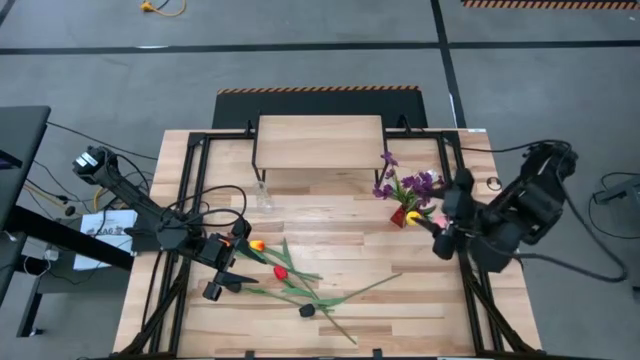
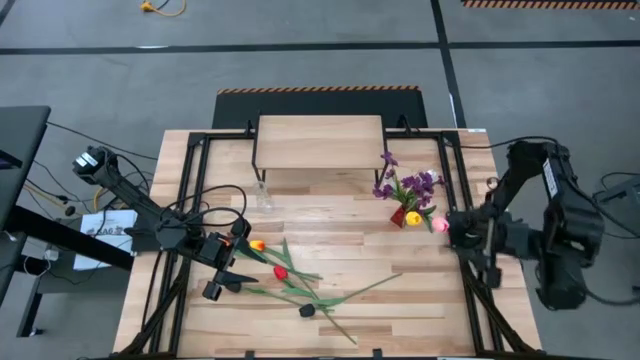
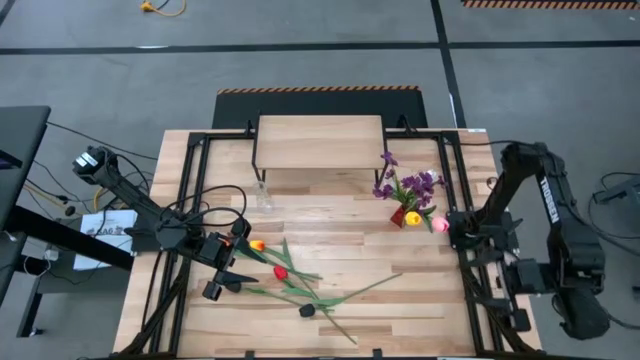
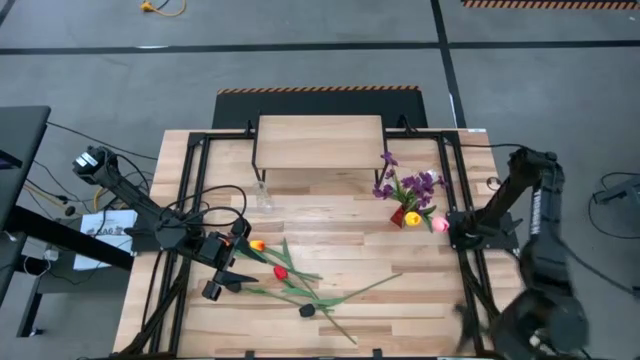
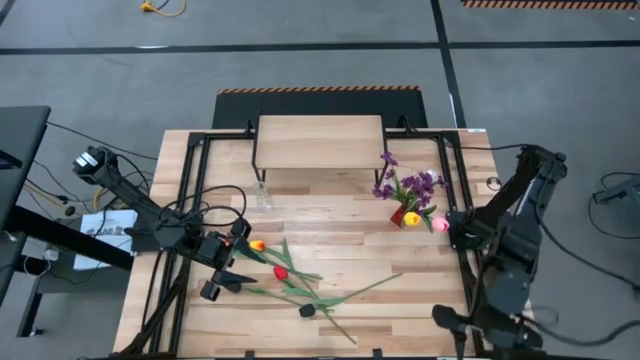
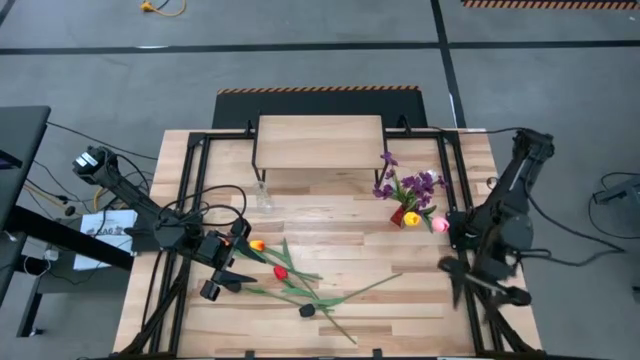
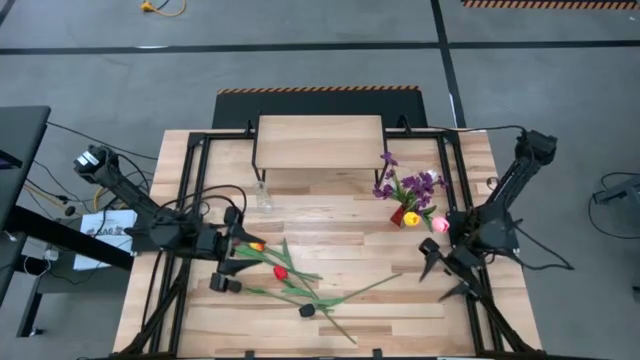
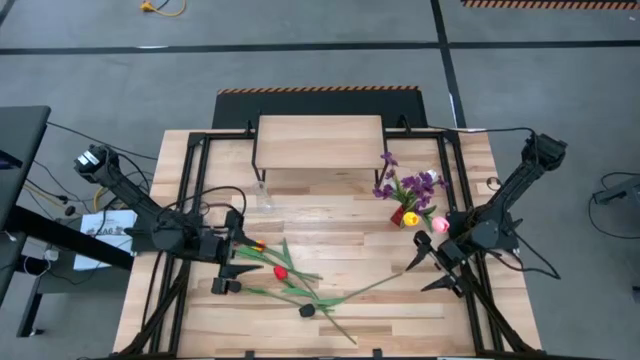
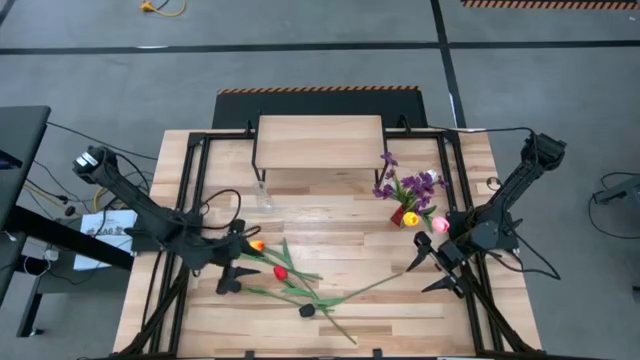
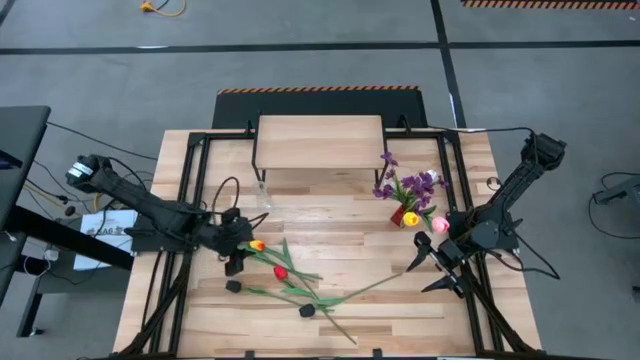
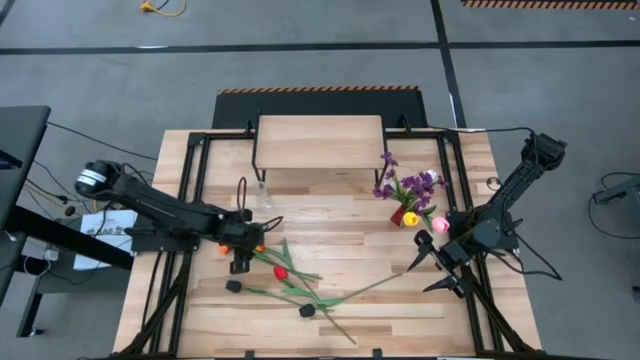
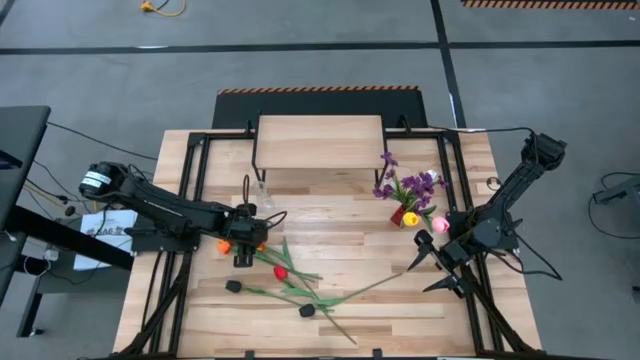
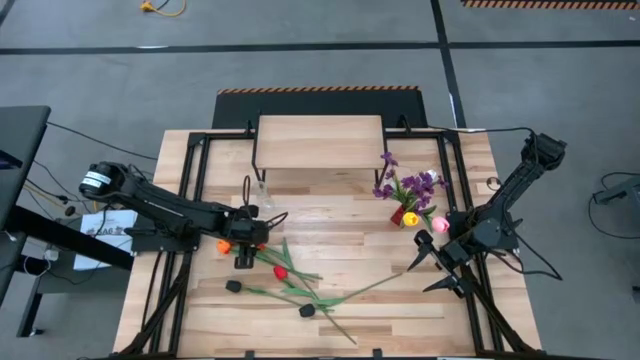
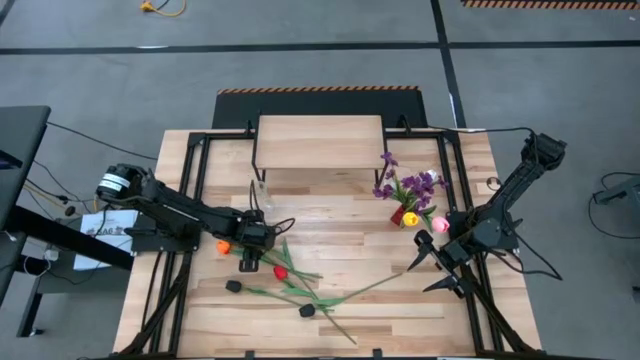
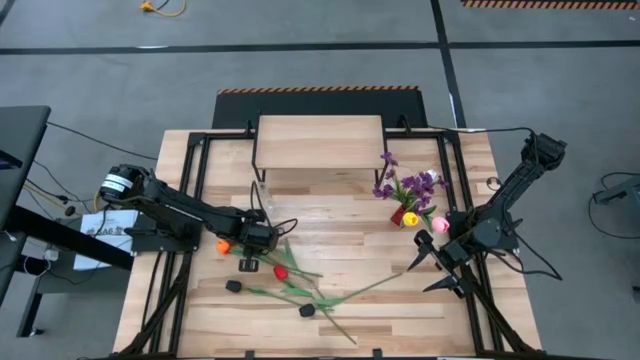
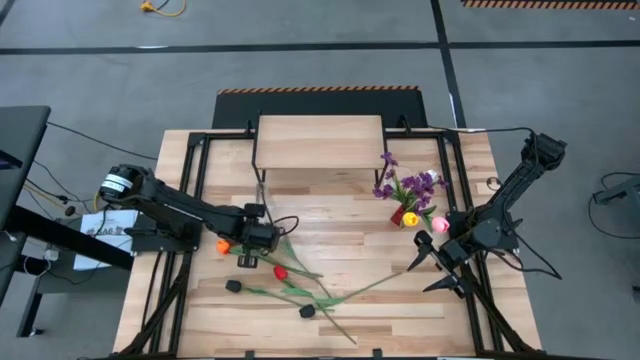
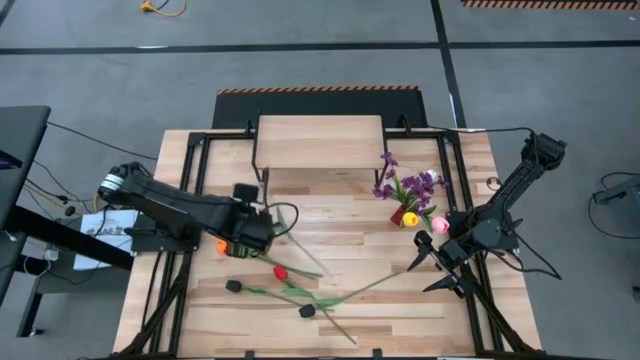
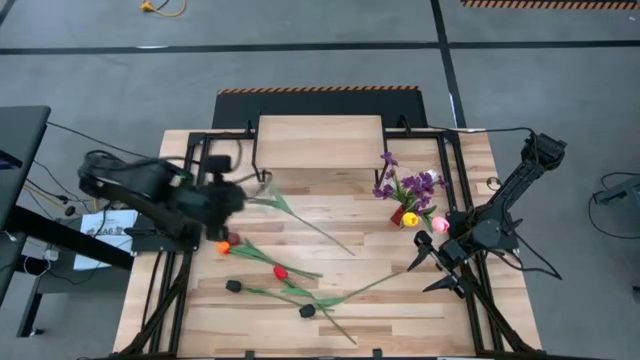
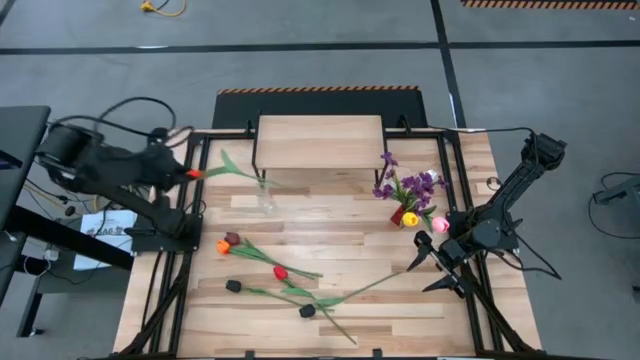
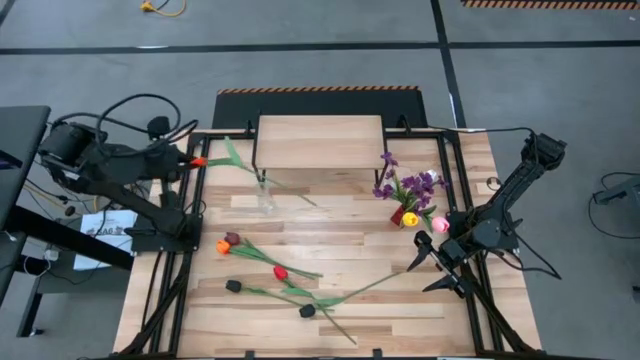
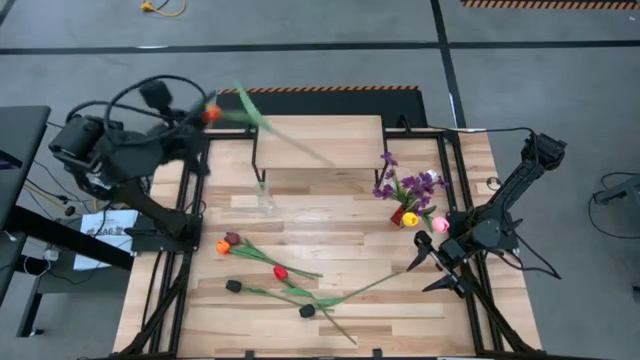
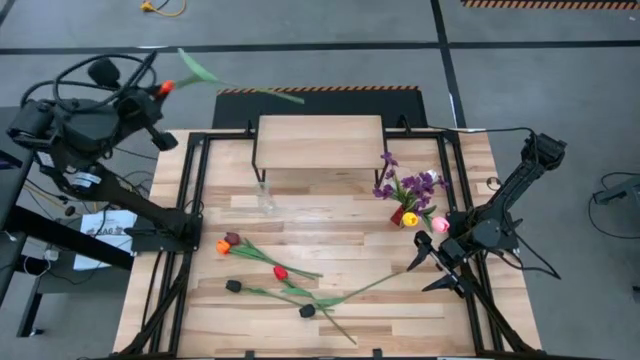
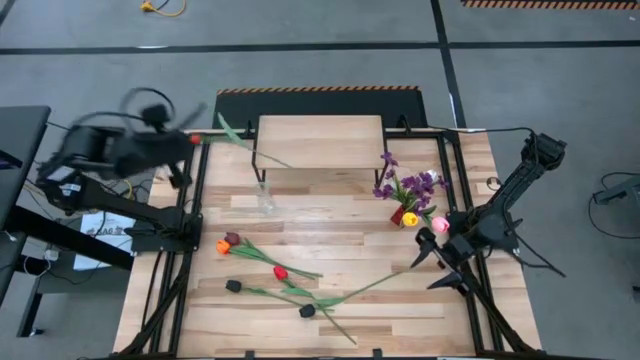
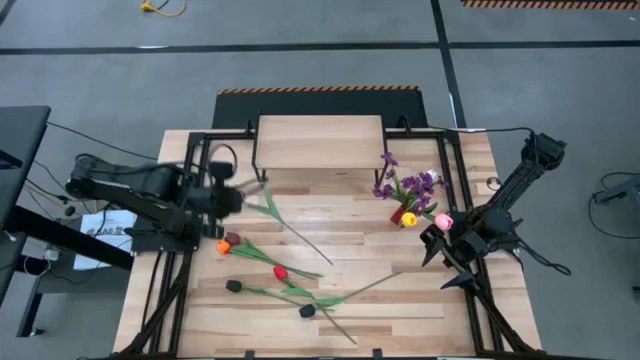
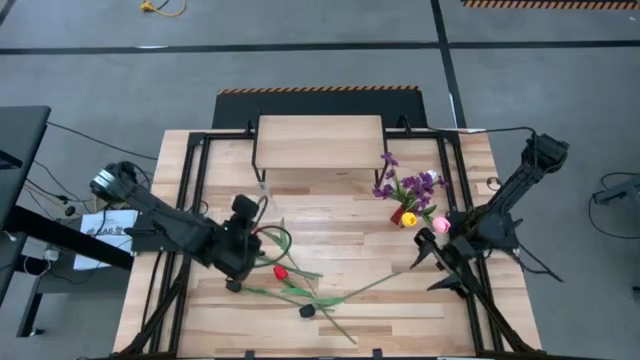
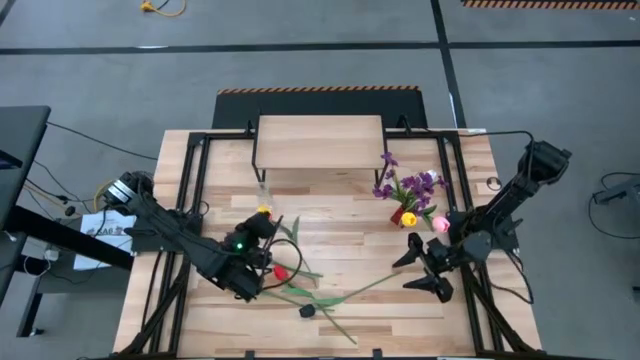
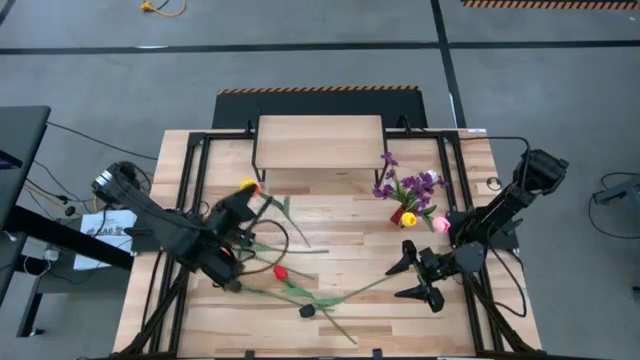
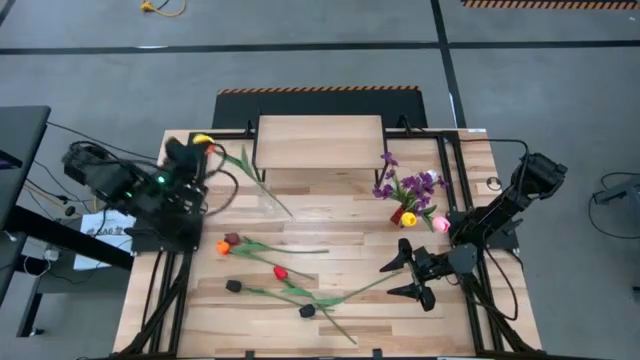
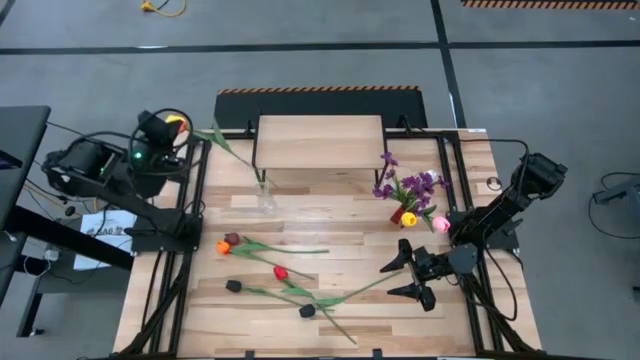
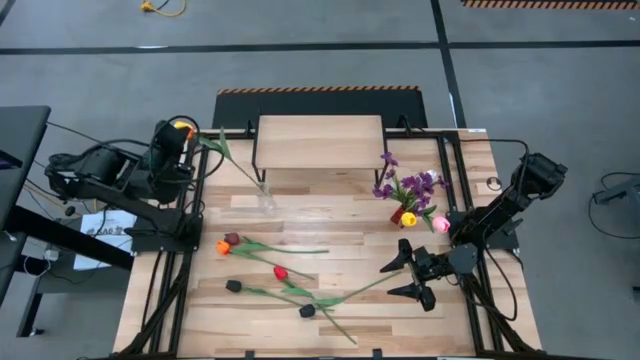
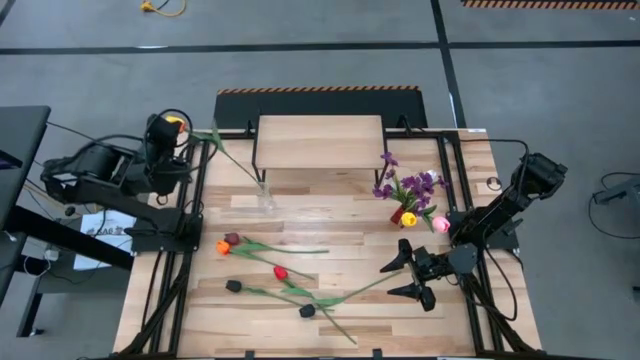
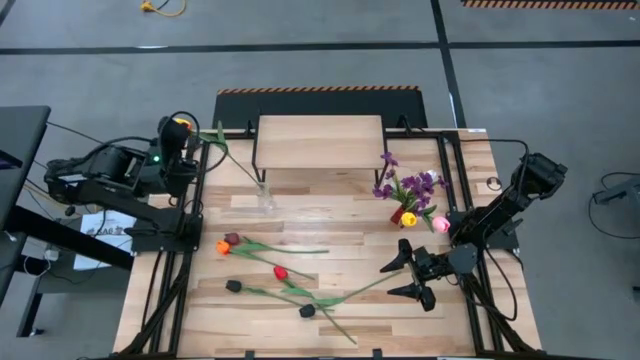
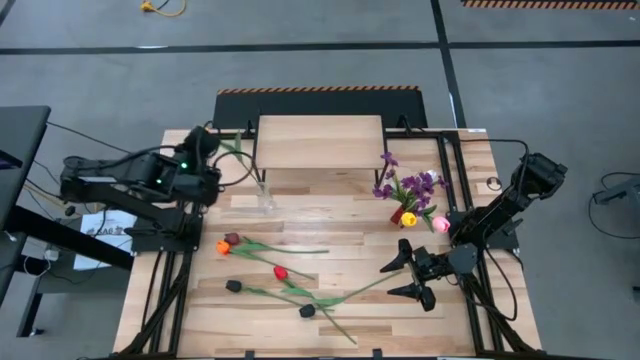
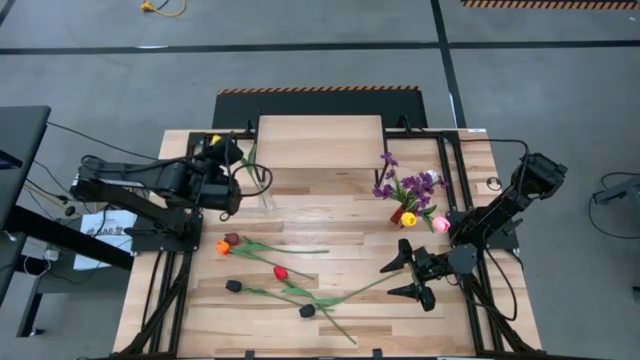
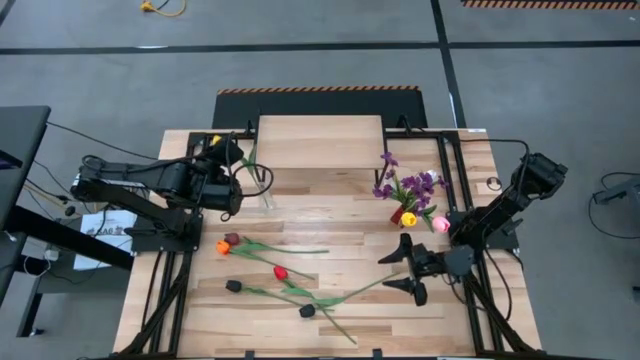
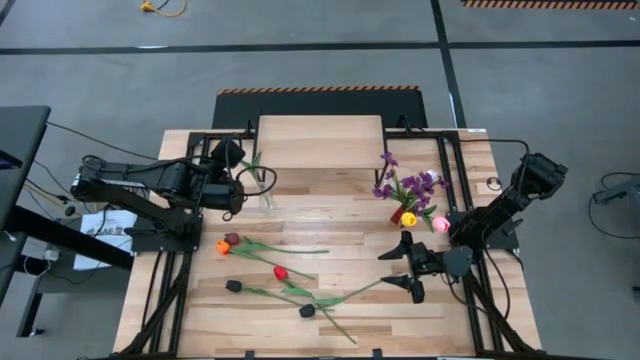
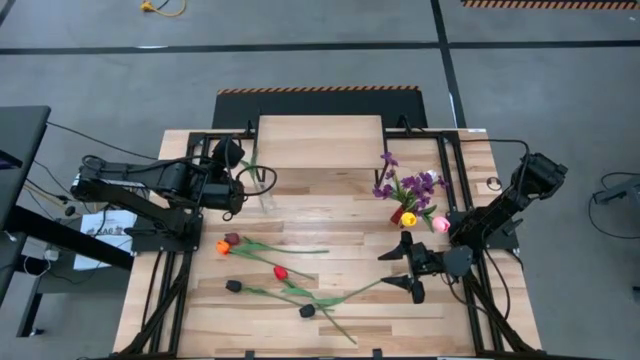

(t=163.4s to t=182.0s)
Task: Pick and place flowers into a vace then onto a shelf
Put the yellow flower into the transparent vase
